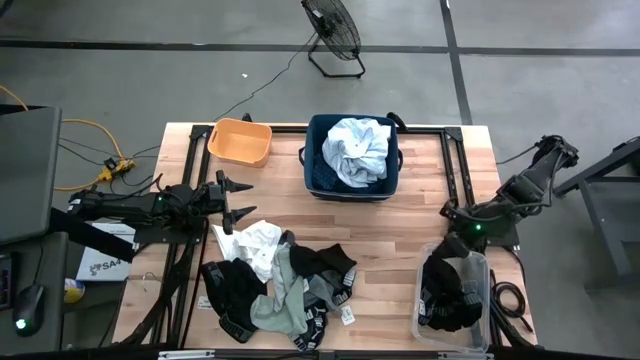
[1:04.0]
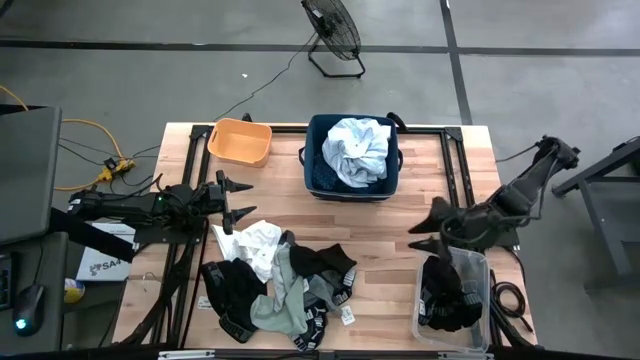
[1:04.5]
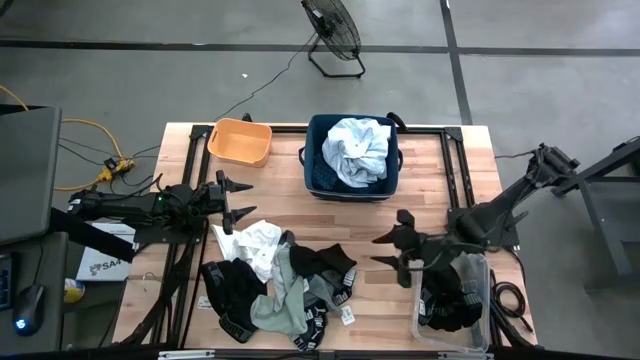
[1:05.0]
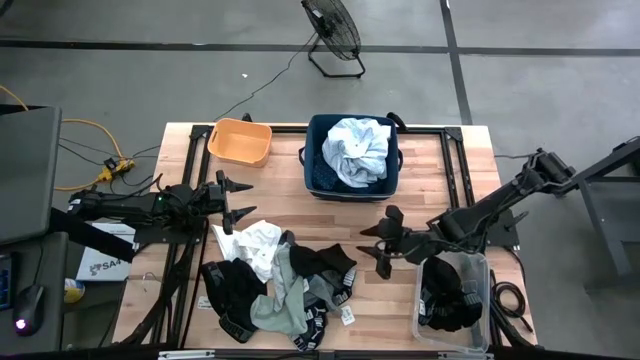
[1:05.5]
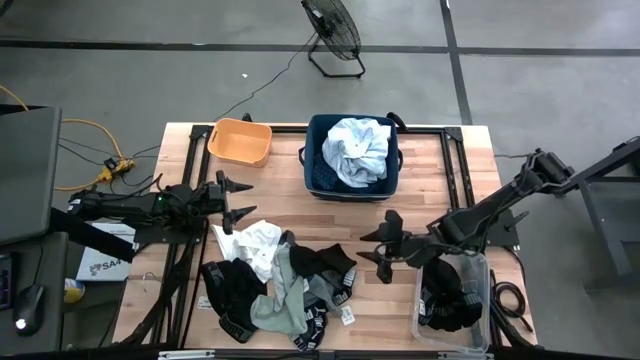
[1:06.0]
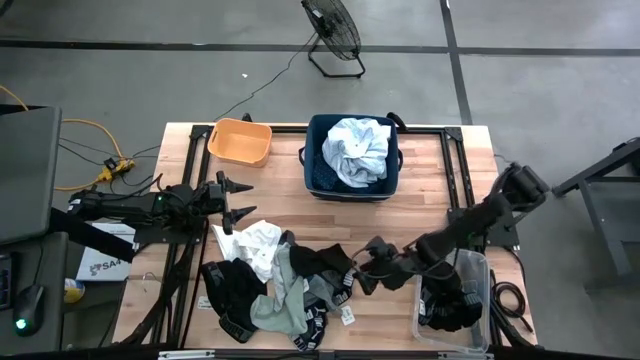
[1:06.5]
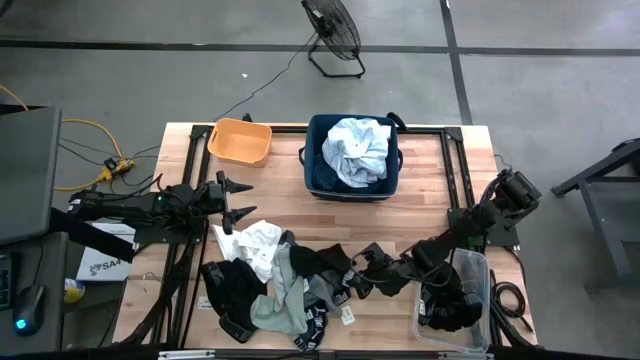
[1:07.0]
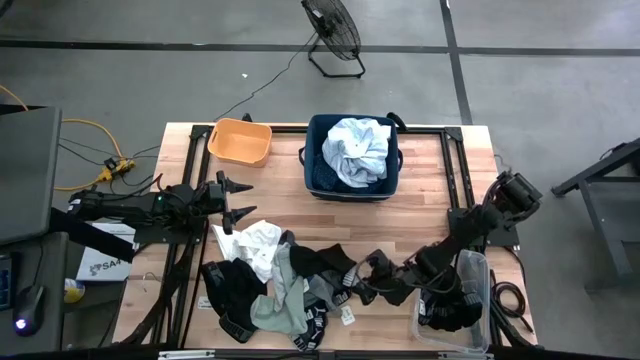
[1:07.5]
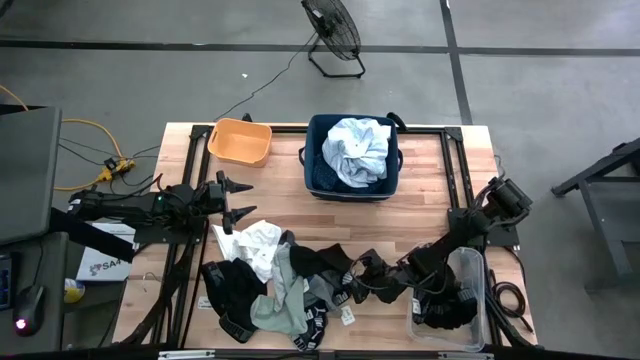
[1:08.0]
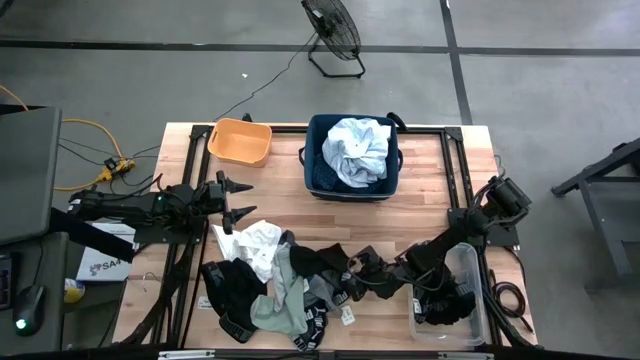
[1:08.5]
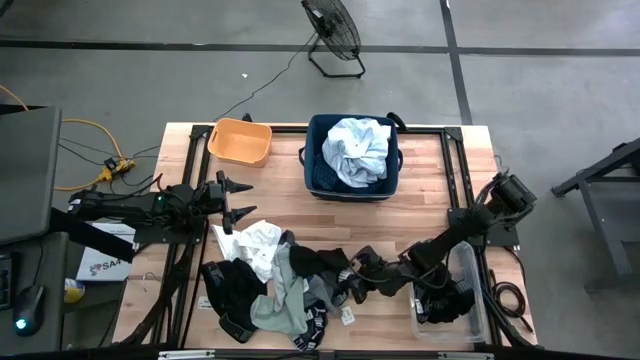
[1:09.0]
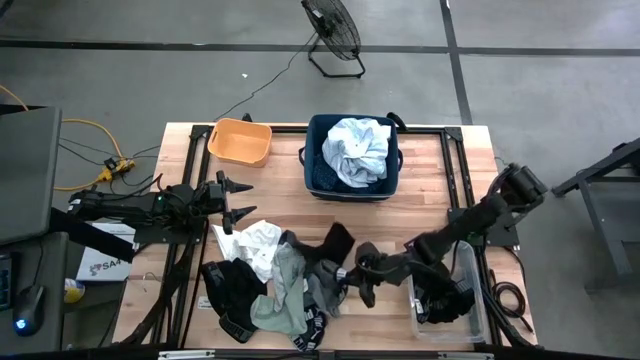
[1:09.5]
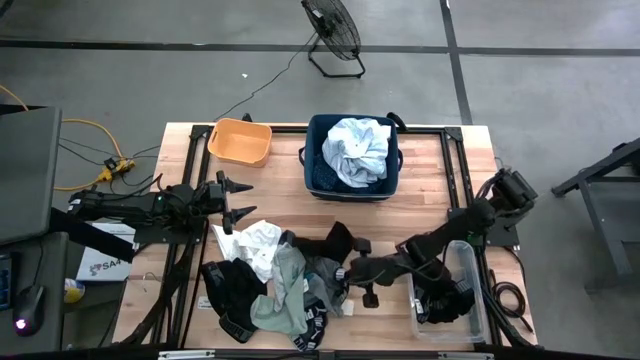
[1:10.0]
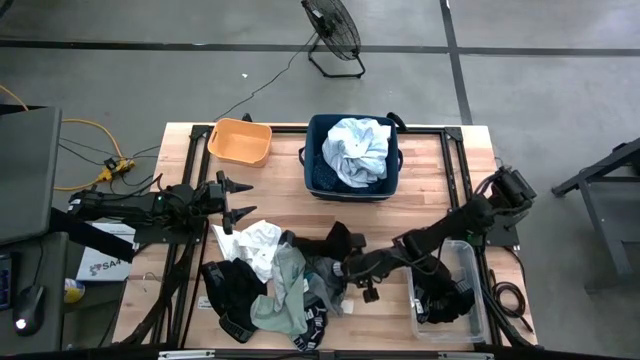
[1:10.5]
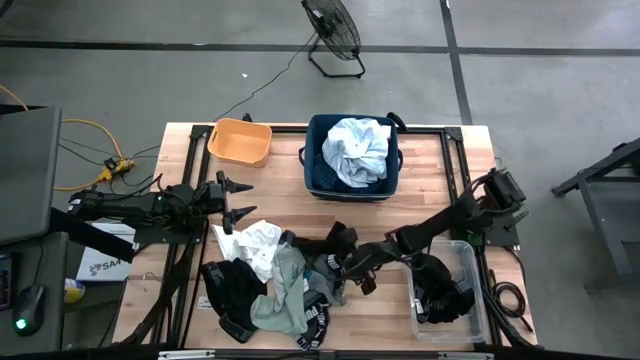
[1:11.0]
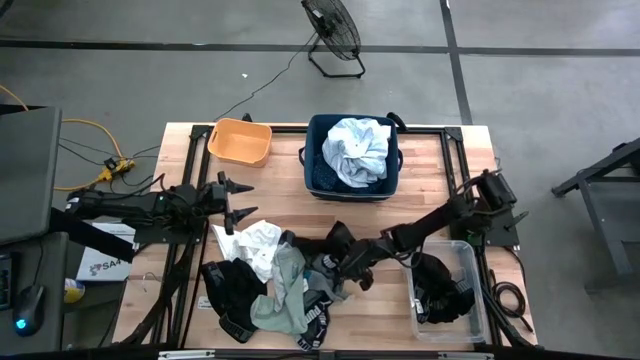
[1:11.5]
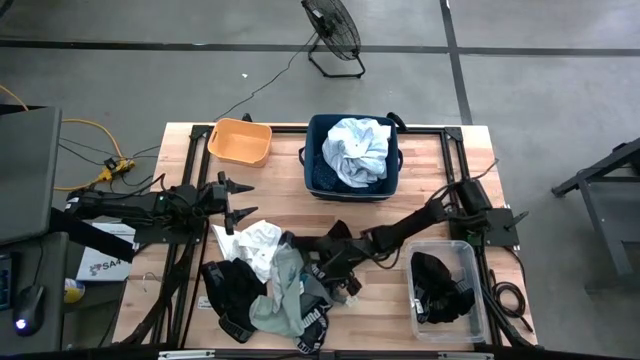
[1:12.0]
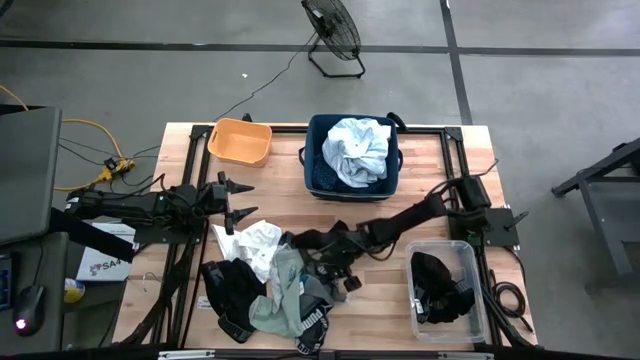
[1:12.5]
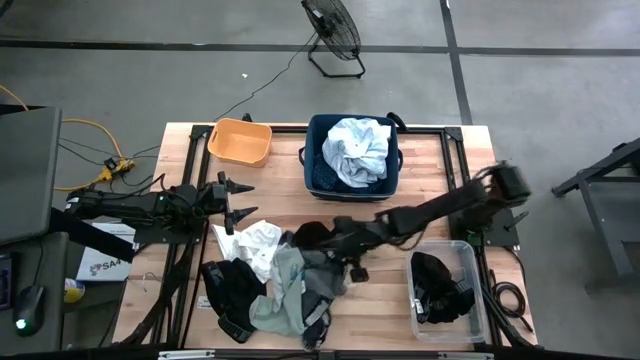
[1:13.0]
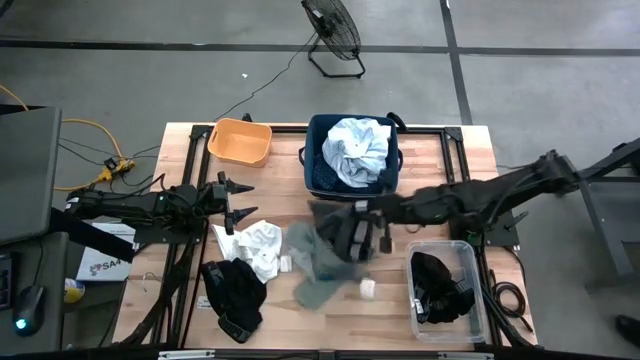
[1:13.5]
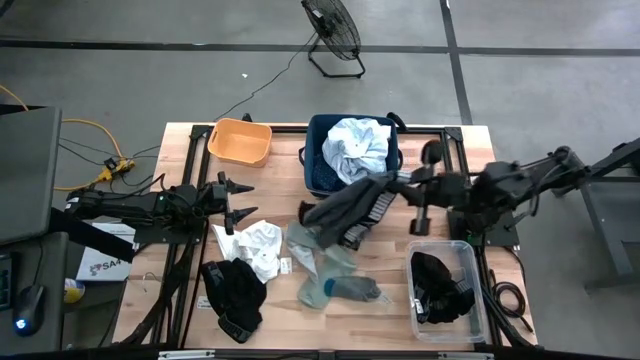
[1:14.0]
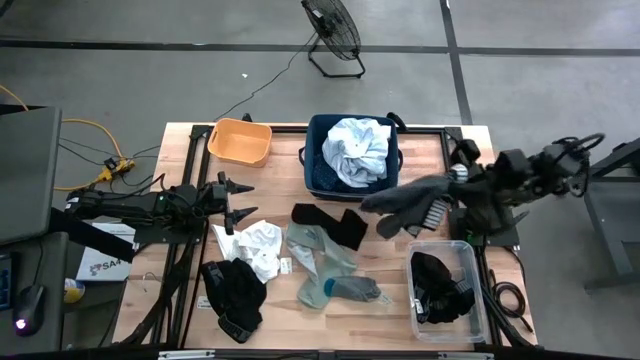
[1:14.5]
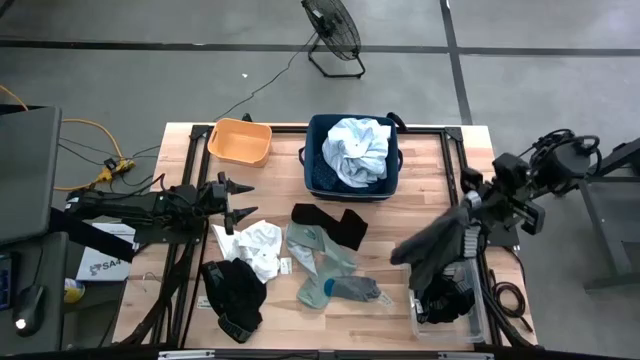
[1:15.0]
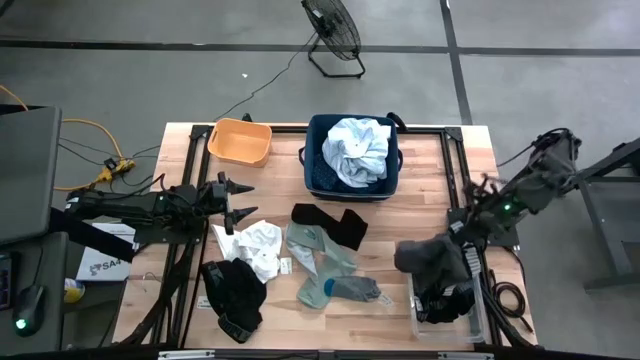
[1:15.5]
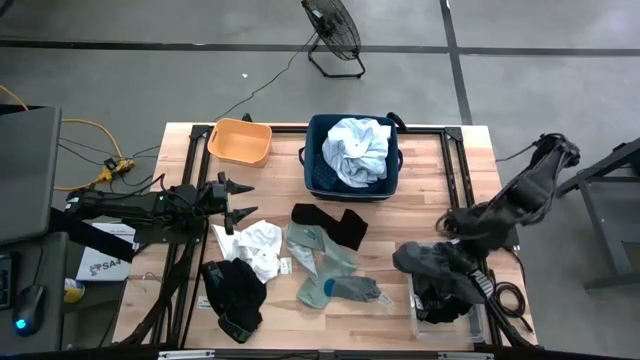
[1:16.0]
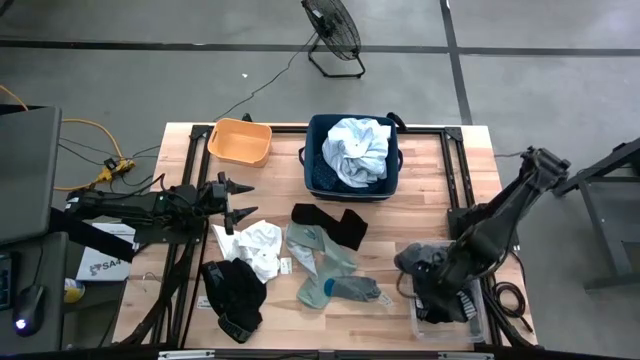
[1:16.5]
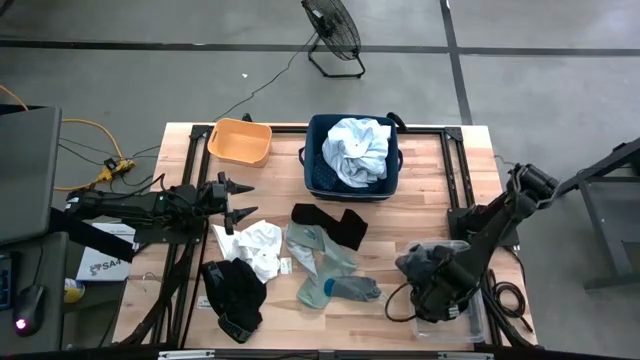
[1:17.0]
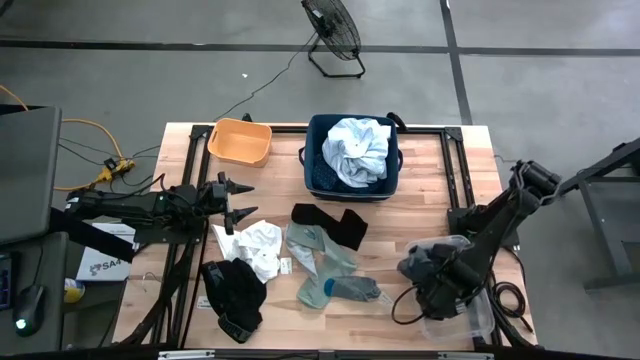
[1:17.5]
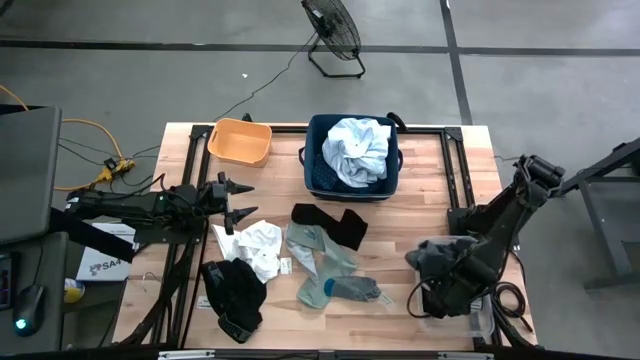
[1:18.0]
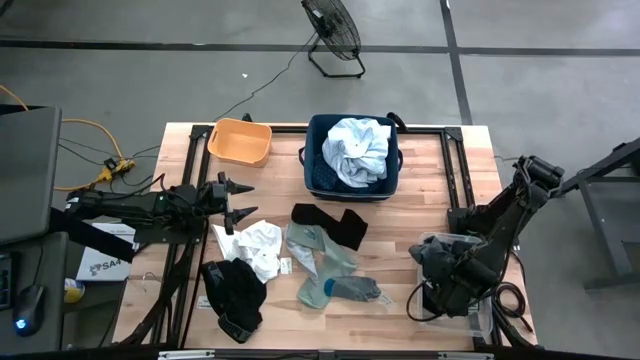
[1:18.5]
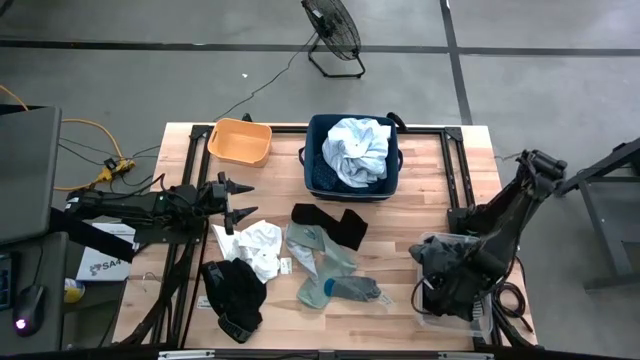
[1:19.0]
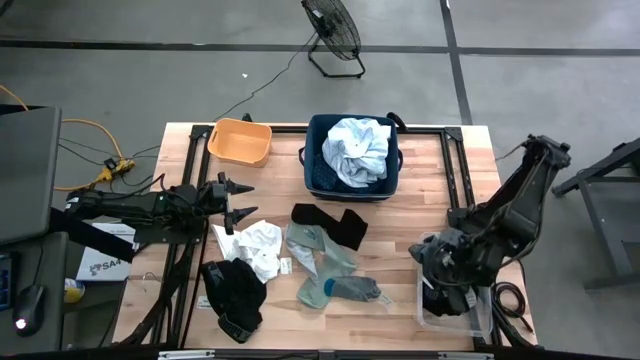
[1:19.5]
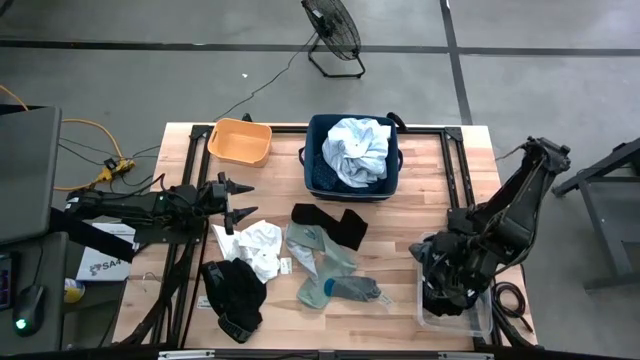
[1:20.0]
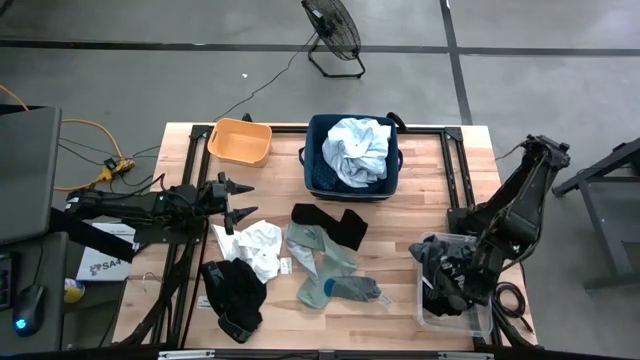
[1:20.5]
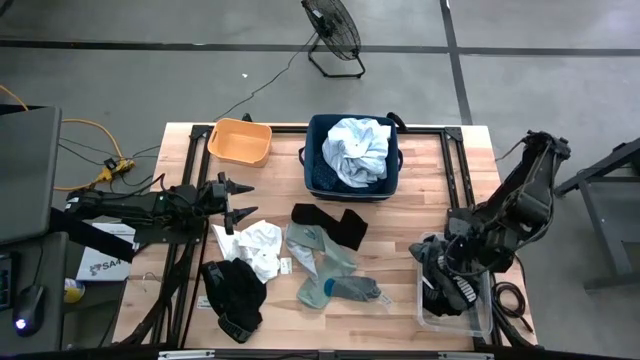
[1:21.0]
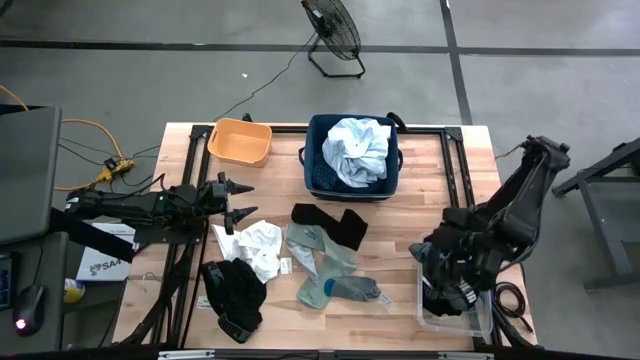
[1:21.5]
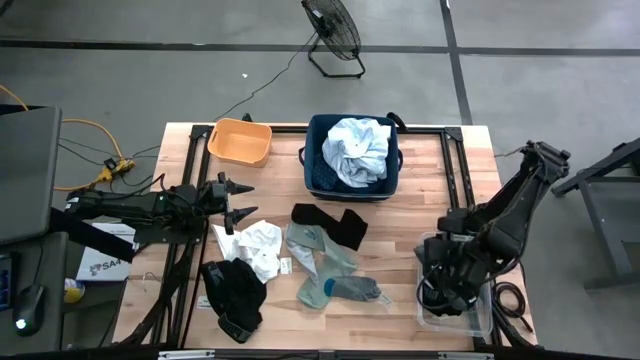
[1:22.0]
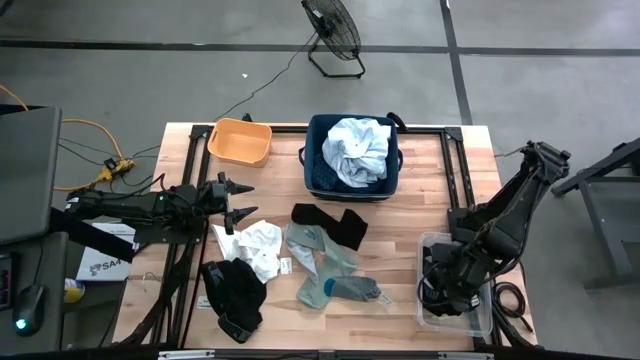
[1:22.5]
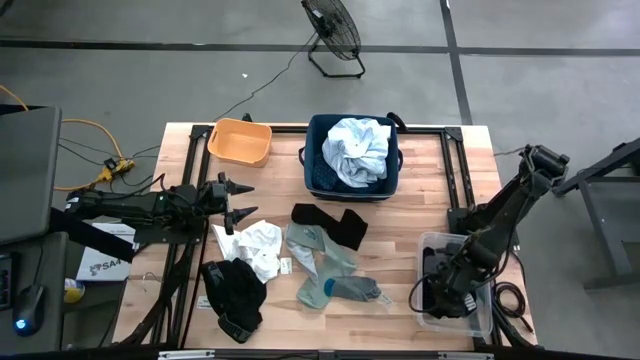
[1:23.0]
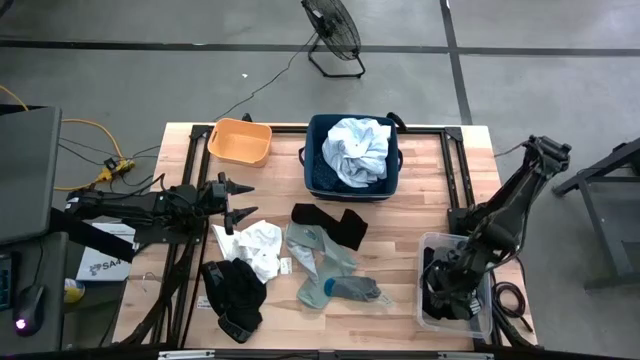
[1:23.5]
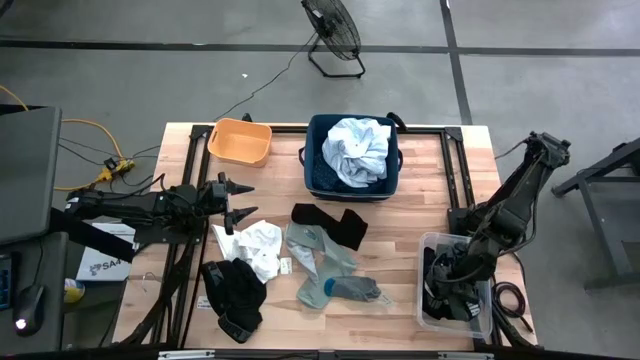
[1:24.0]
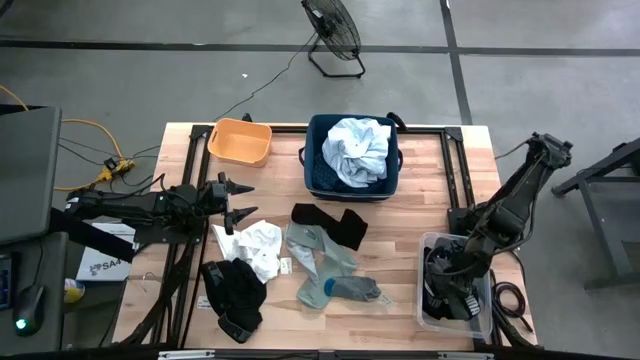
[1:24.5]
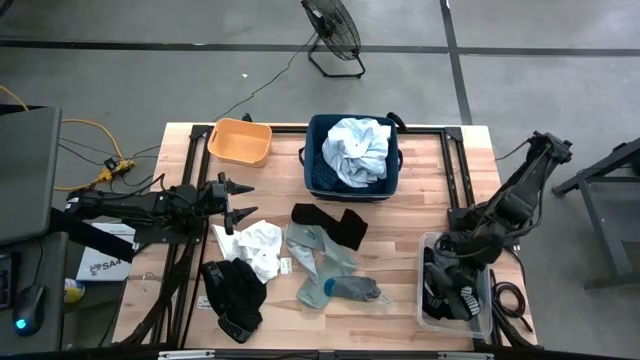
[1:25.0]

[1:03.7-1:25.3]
Task: Pick & Place Cloths
Put the gray boxer shorts into the transparent bin
